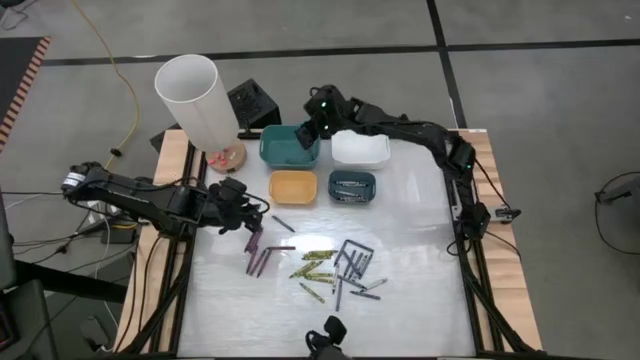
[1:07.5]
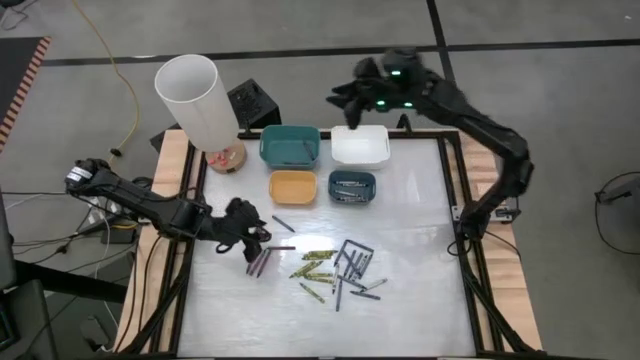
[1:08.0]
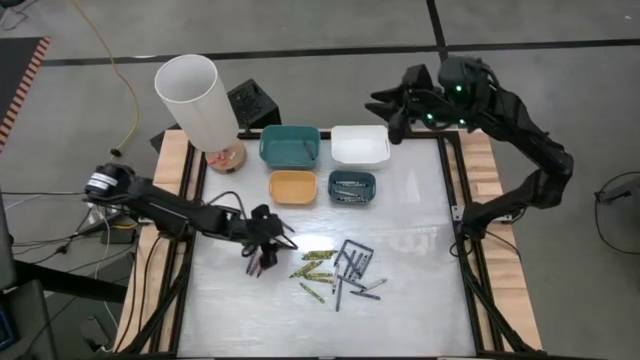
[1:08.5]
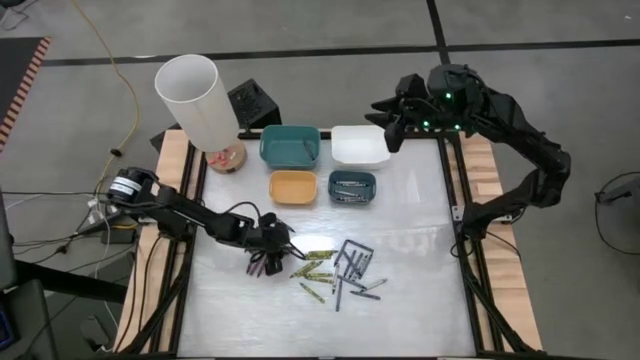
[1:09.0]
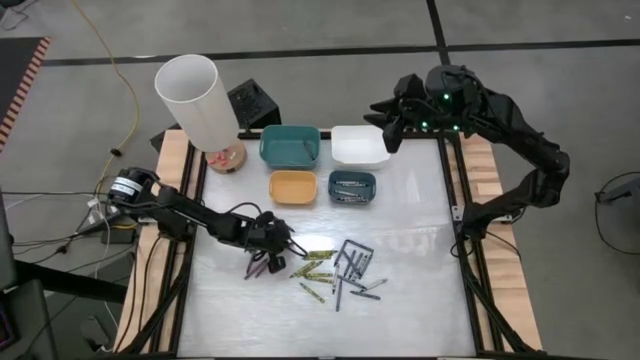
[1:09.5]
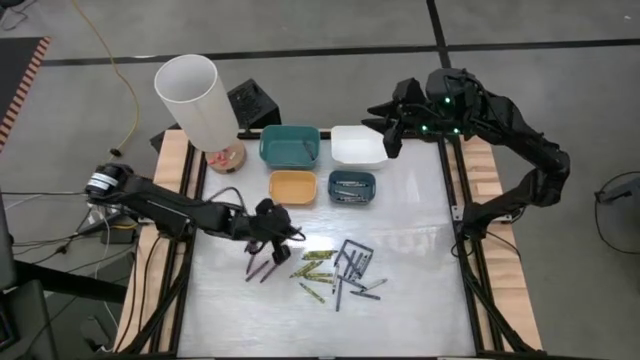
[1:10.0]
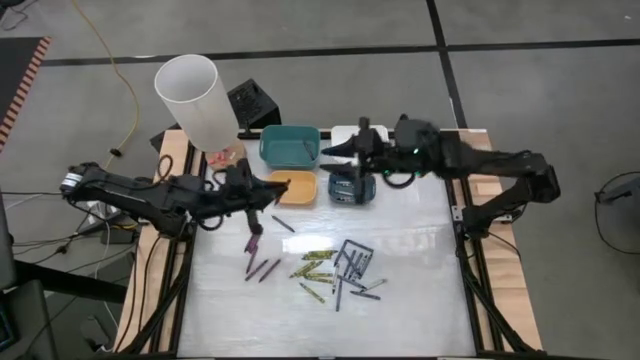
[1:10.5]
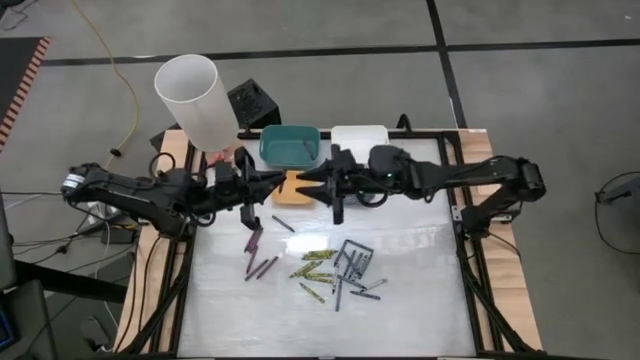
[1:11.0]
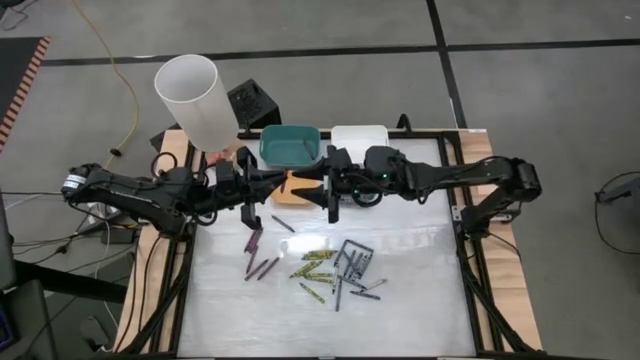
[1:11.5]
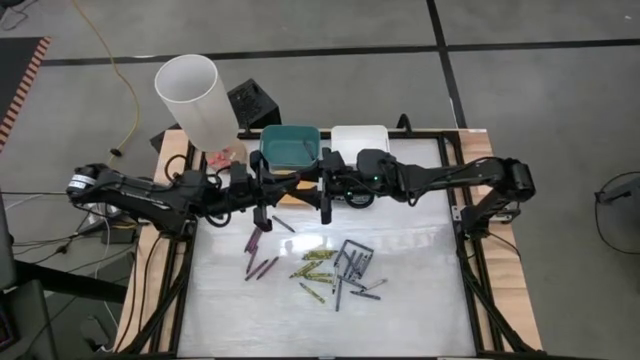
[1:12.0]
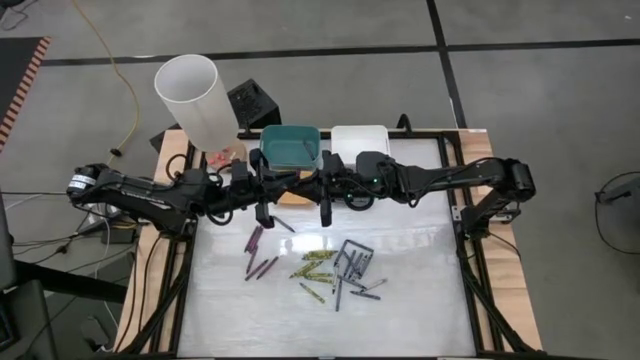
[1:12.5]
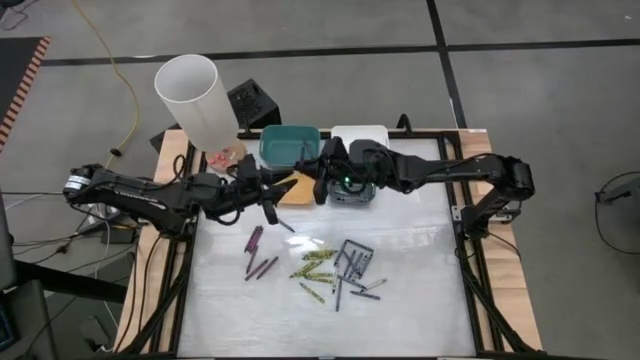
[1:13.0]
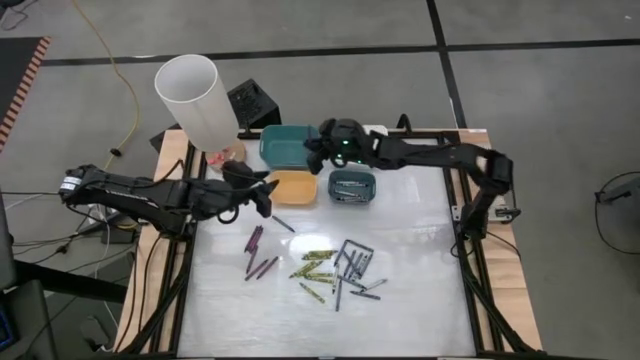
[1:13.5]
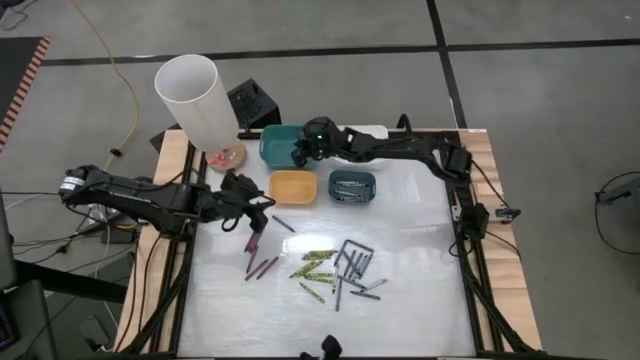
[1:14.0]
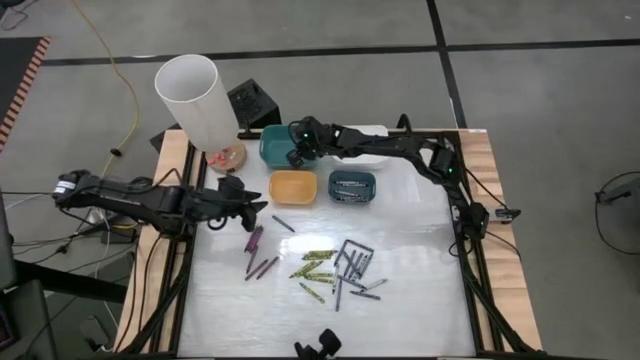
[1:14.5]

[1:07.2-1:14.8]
Task: Sort crayons
Put the violet crayon into the green bin

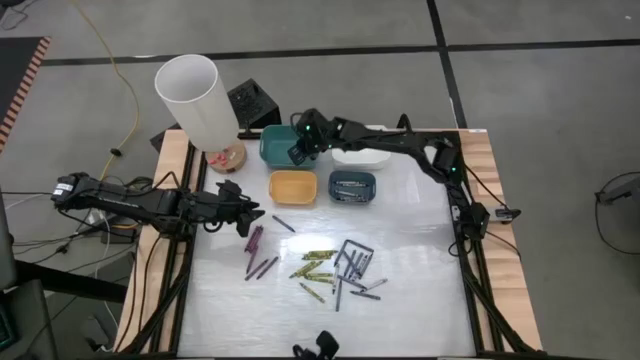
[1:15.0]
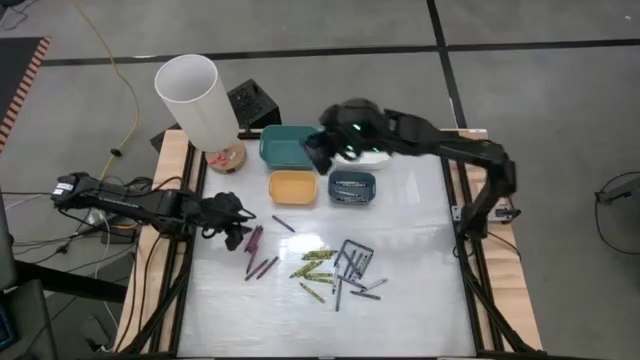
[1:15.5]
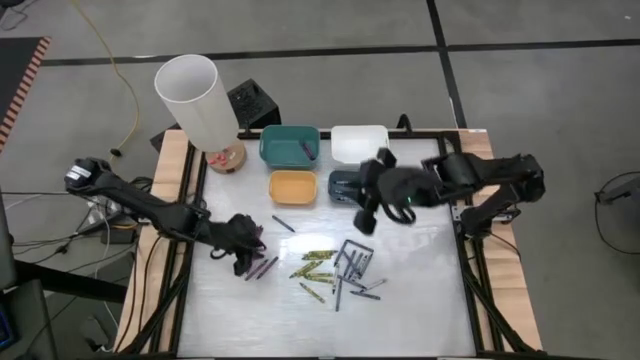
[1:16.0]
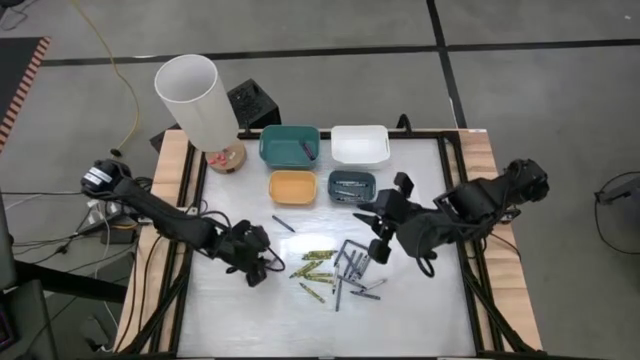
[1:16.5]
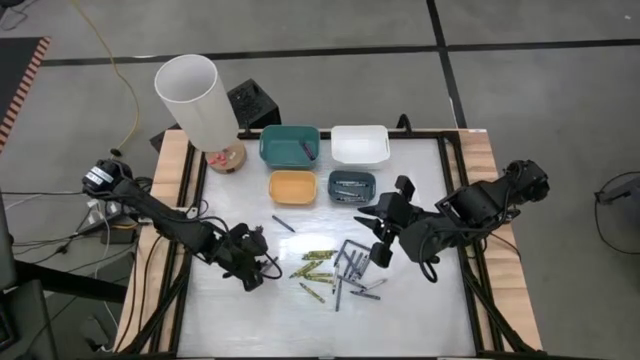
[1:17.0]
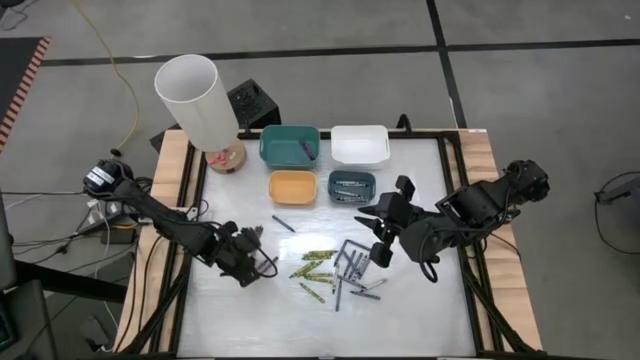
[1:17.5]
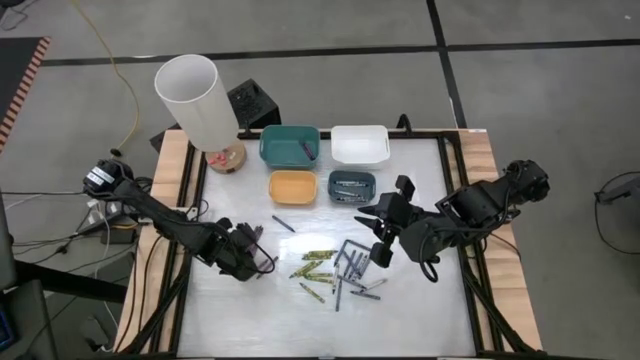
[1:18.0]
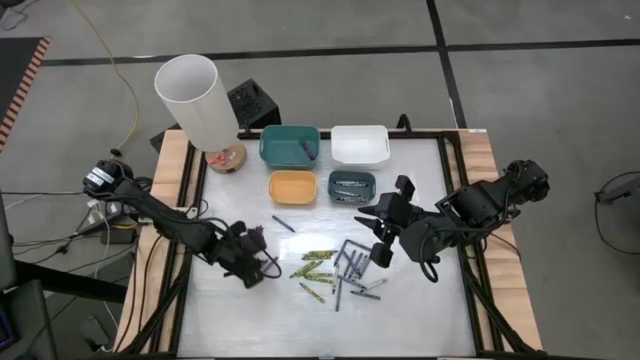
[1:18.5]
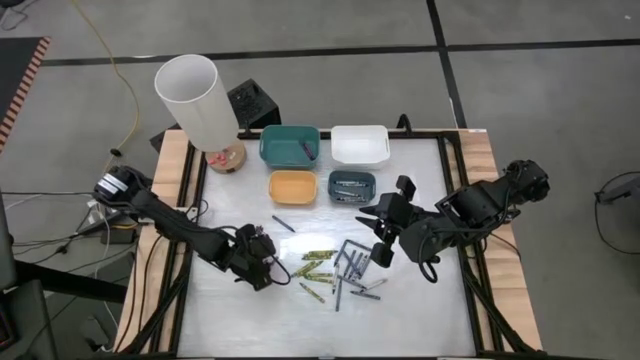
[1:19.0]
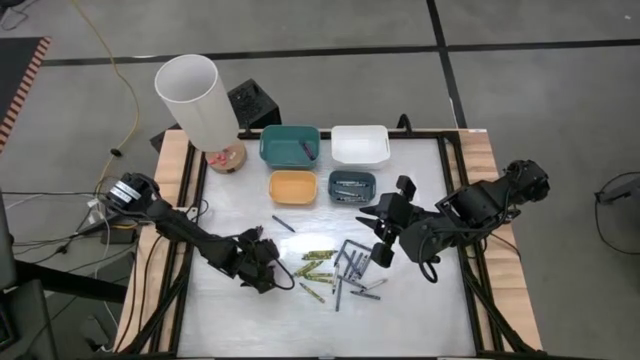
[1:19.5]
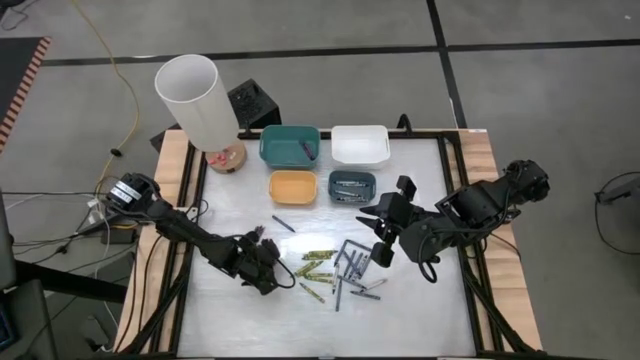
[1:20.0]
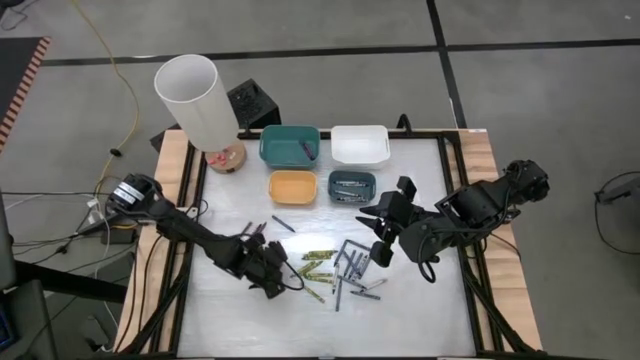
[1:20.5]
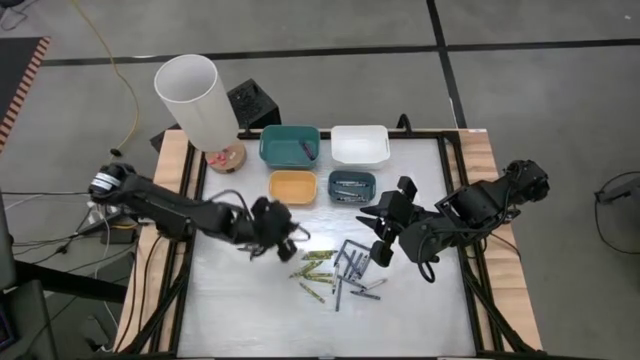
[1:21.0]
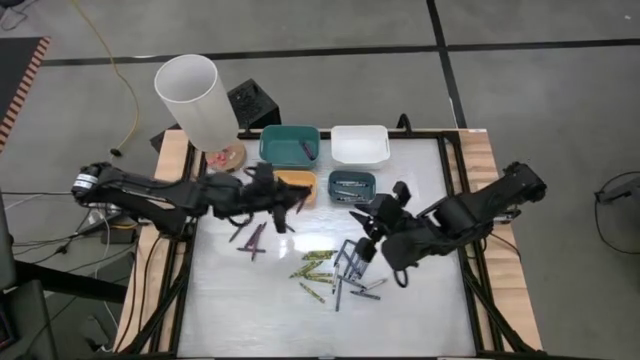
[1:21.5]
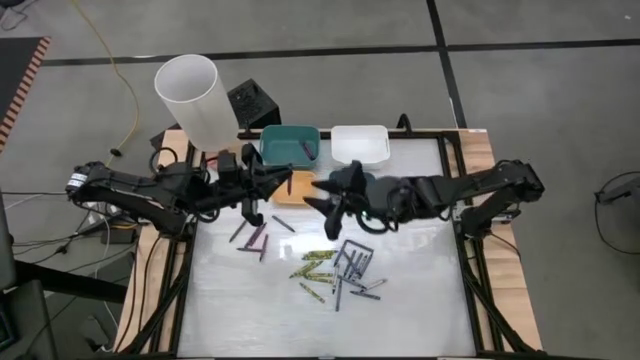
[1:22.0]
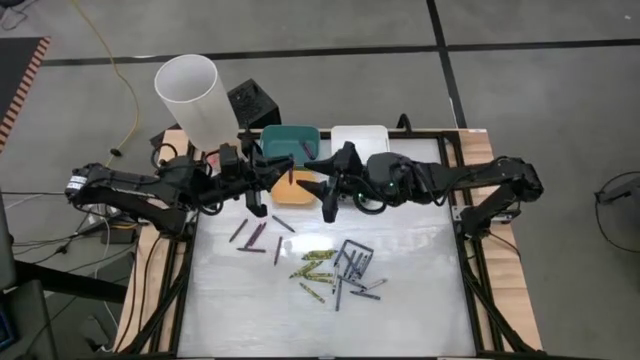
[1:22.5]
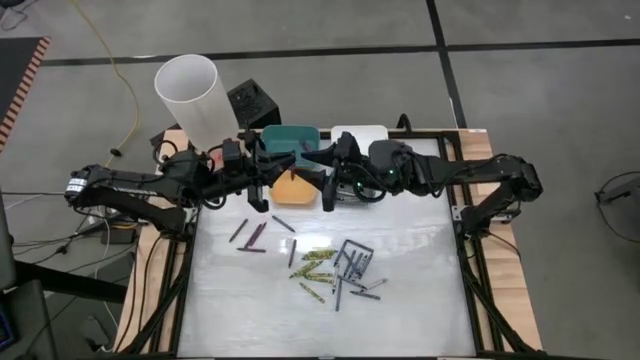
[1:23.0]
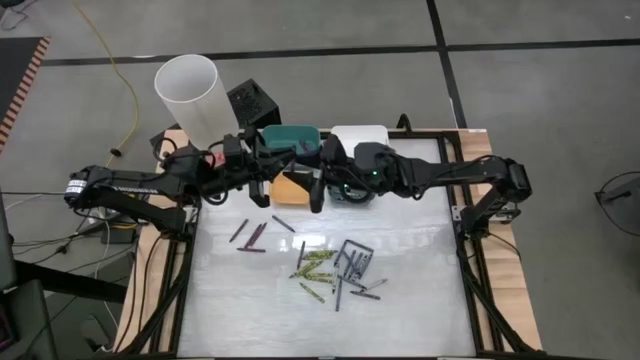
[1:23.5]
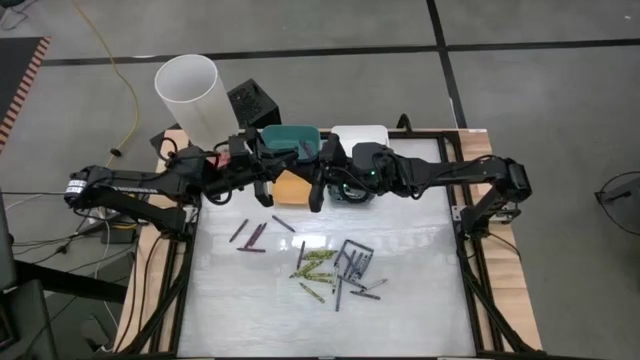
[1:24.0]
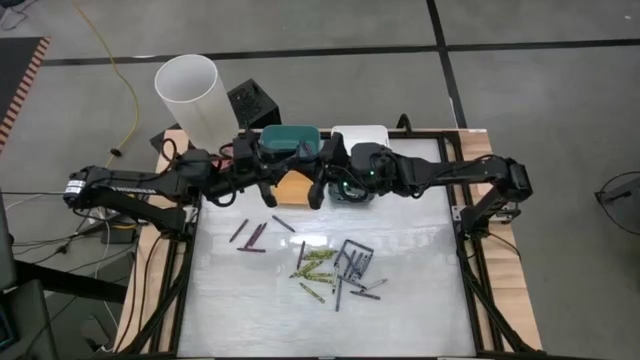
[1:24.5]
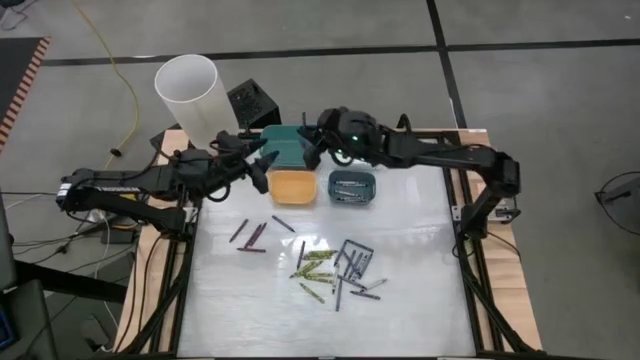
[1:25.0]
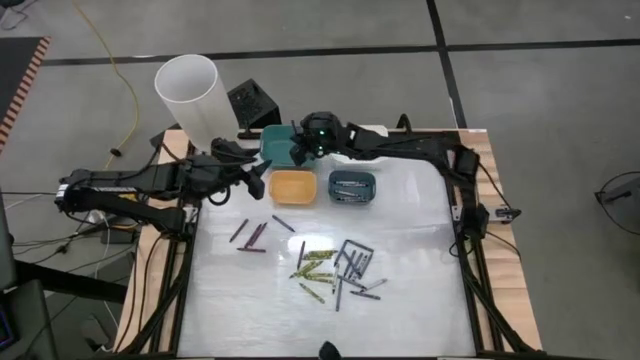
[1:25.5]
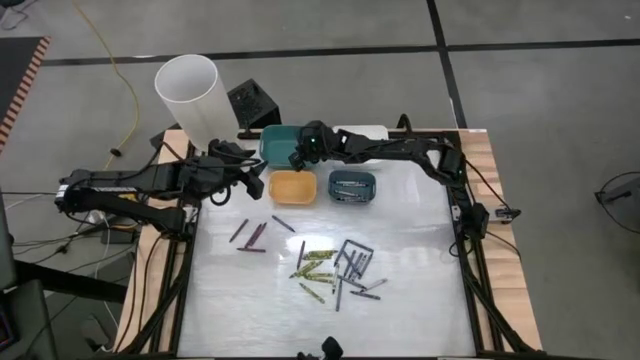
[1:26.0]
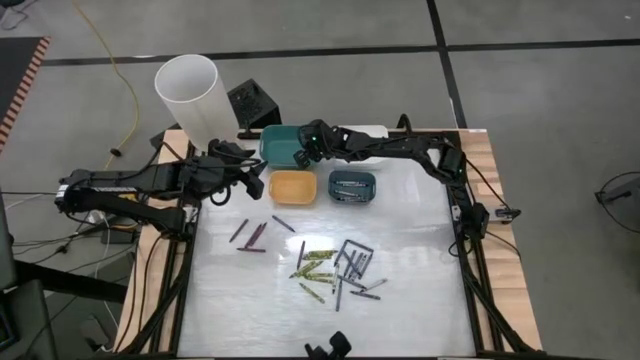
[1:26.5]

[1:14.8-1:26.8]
Put the violet crayon into the green bin

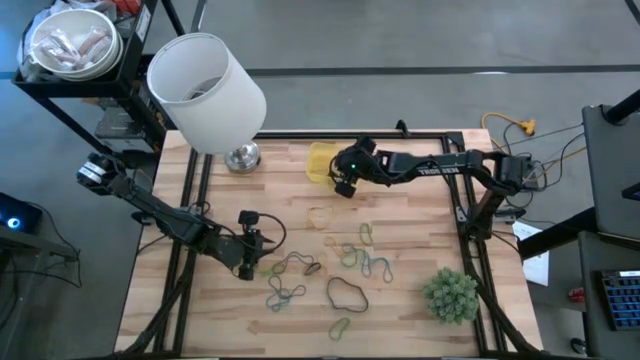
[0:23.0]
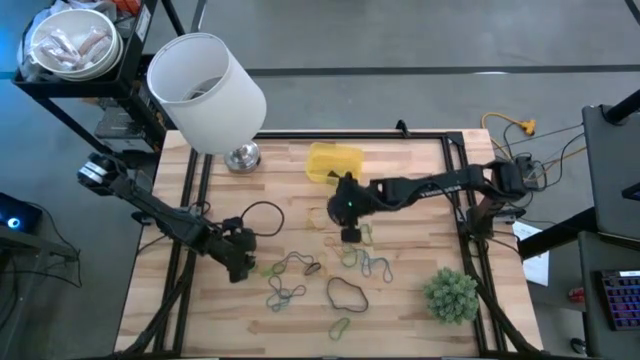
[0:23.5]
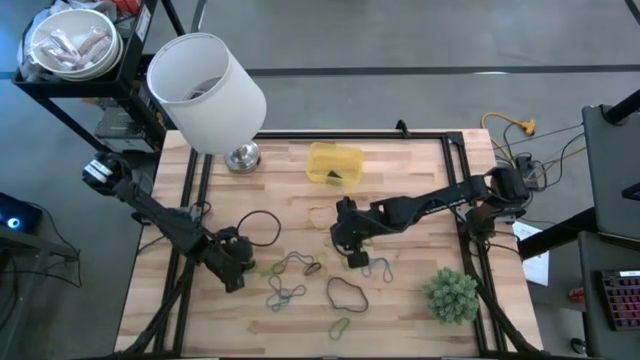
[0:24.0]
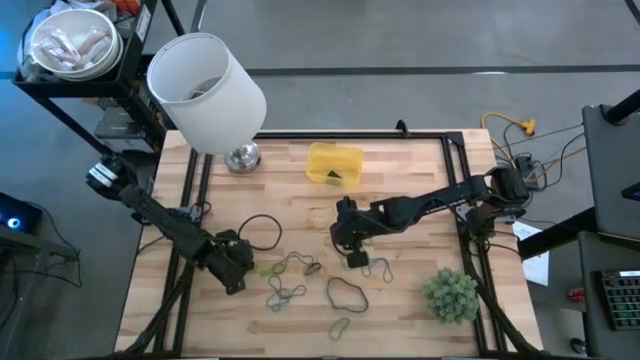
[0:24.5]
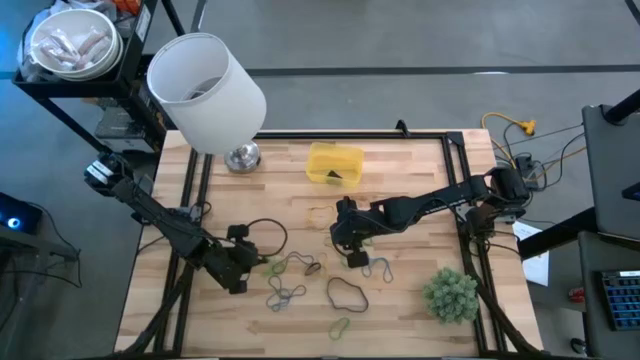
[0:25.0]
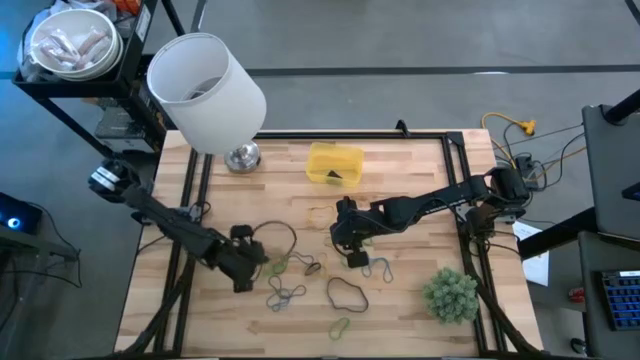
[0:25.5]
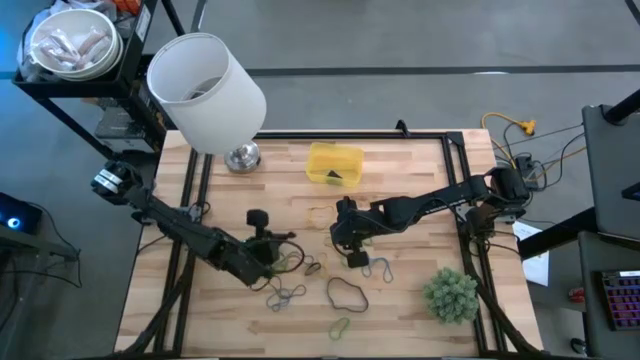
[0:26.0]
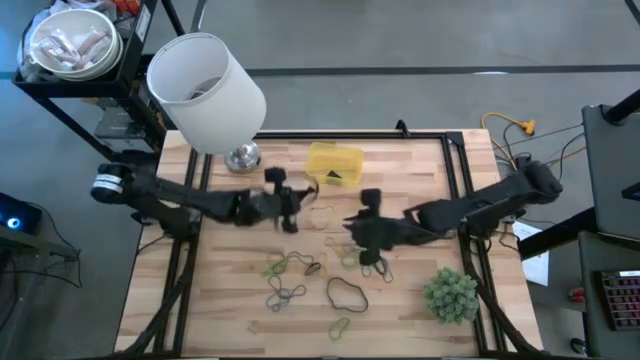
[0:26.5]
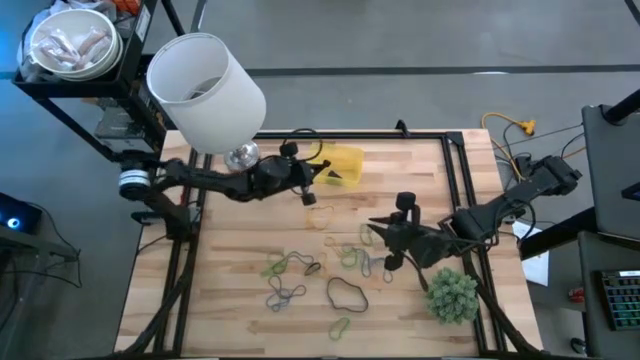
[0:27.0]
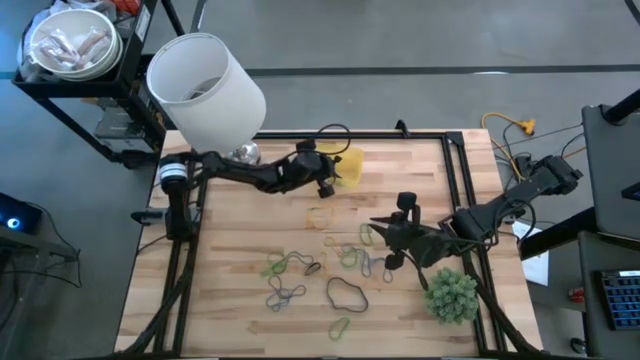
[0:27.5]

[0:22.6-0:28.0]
Task: Pick and place rubber bands into bin
Put the black rubber band into the yellow bin
